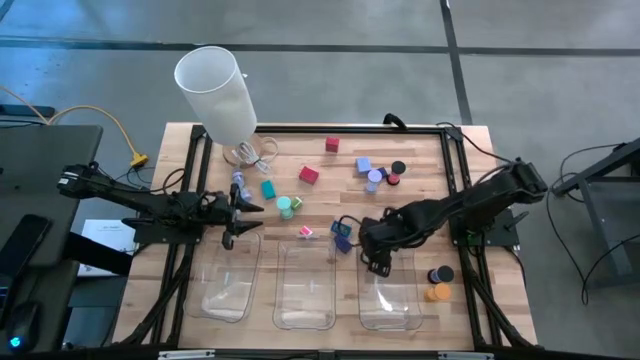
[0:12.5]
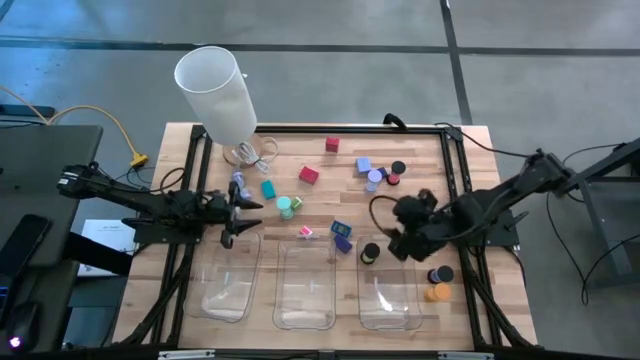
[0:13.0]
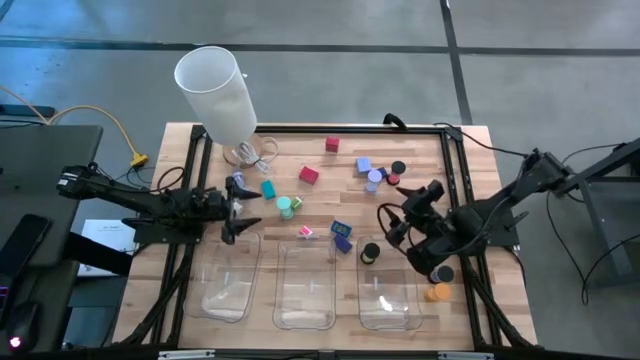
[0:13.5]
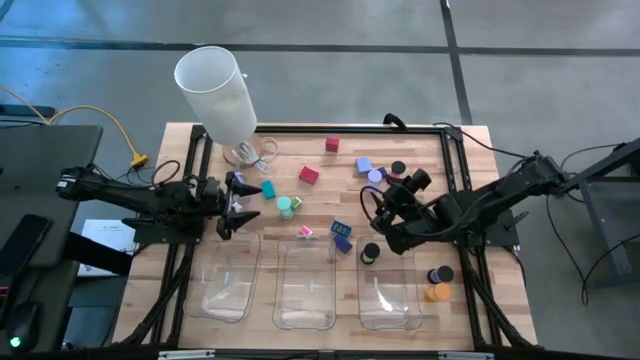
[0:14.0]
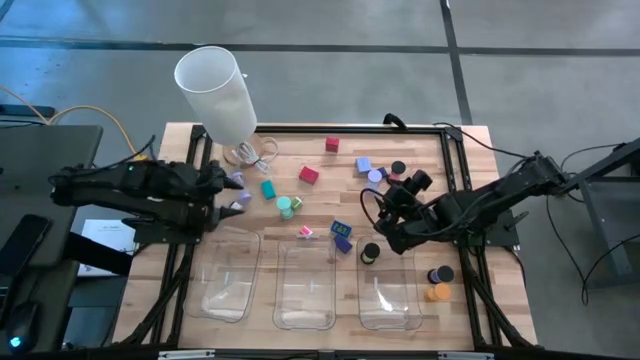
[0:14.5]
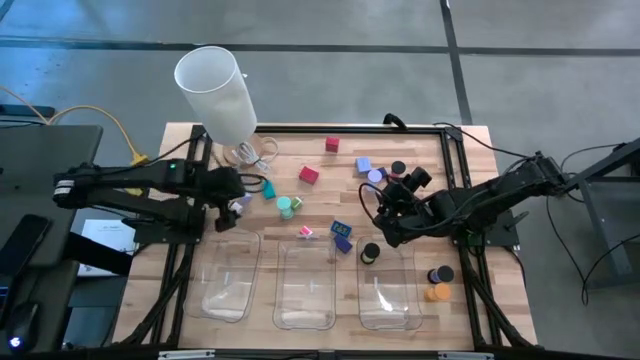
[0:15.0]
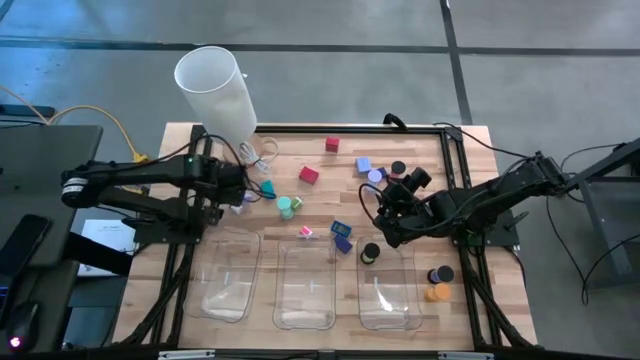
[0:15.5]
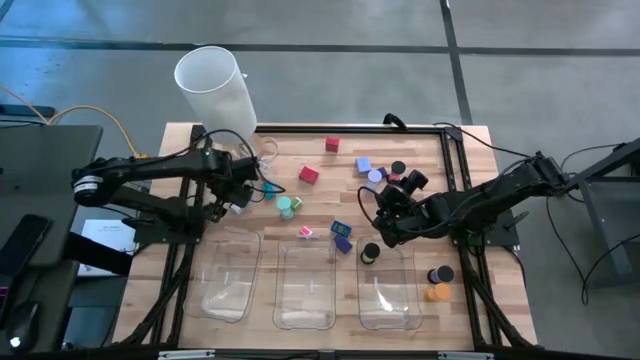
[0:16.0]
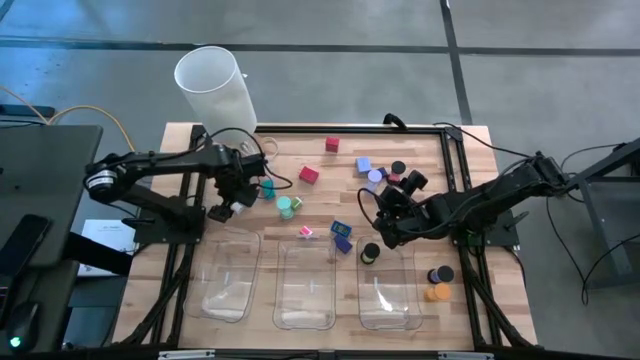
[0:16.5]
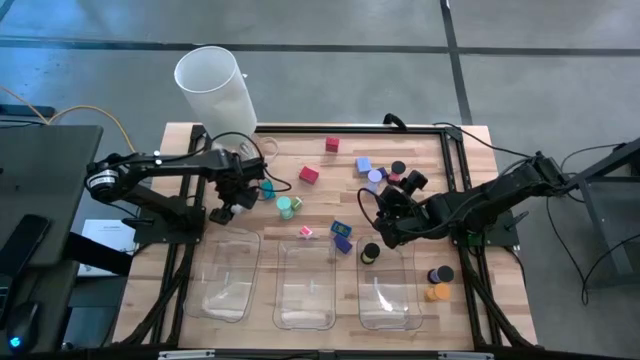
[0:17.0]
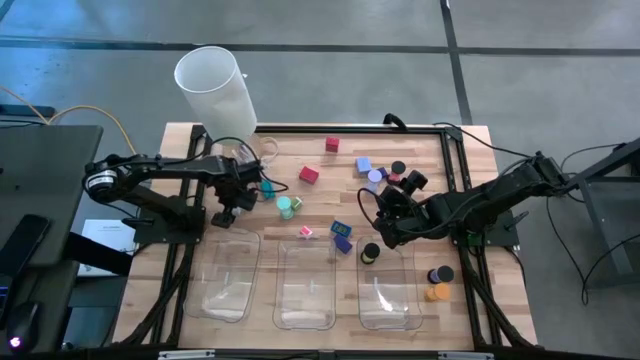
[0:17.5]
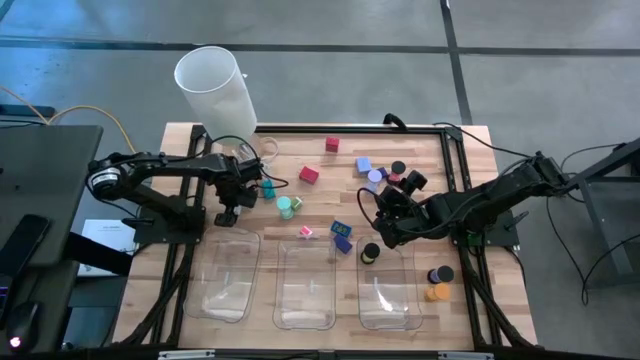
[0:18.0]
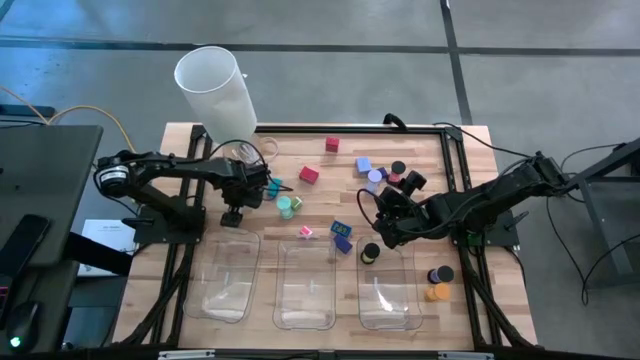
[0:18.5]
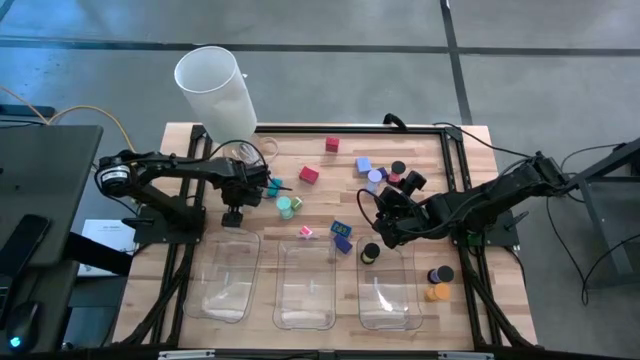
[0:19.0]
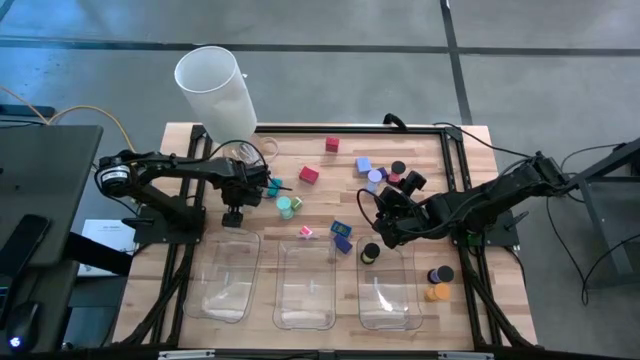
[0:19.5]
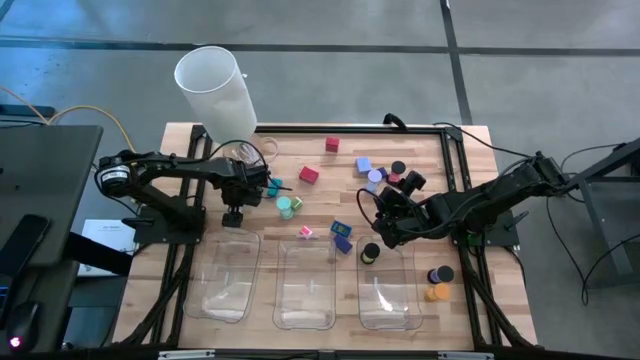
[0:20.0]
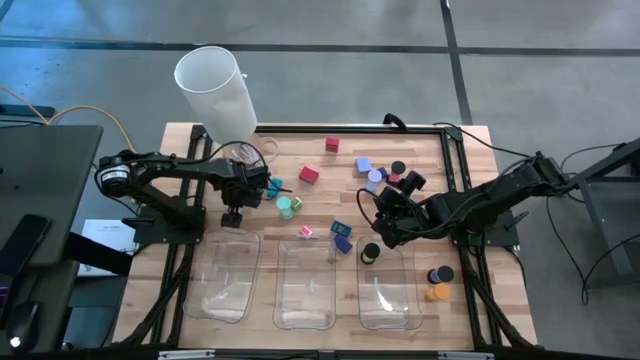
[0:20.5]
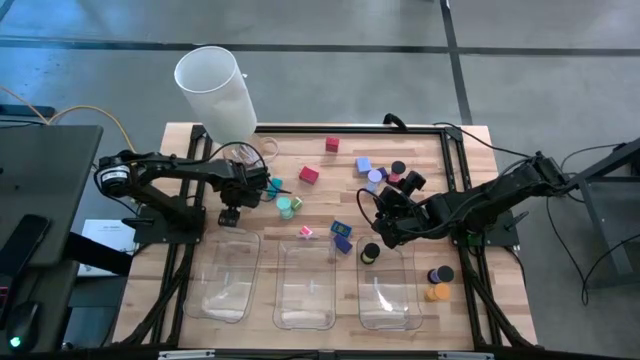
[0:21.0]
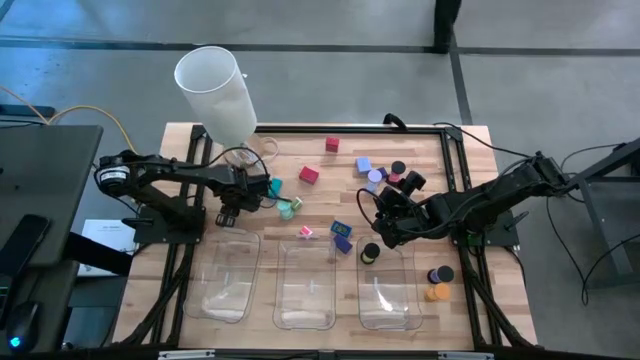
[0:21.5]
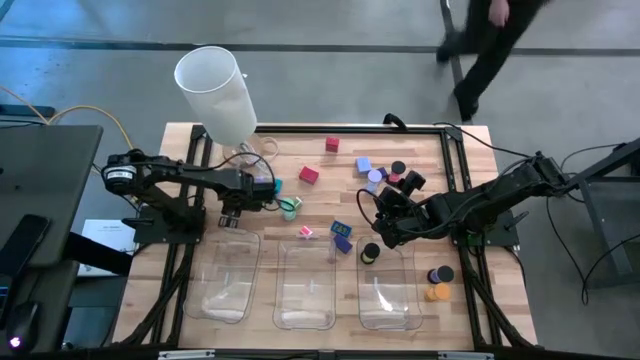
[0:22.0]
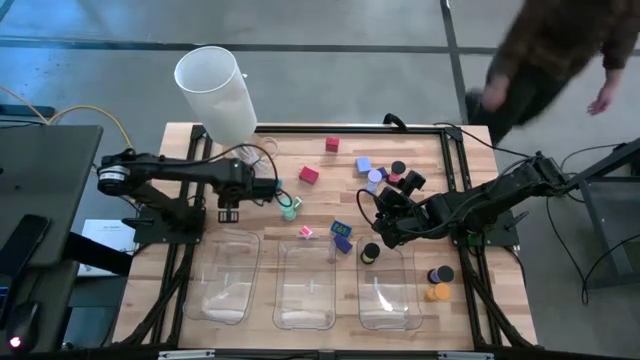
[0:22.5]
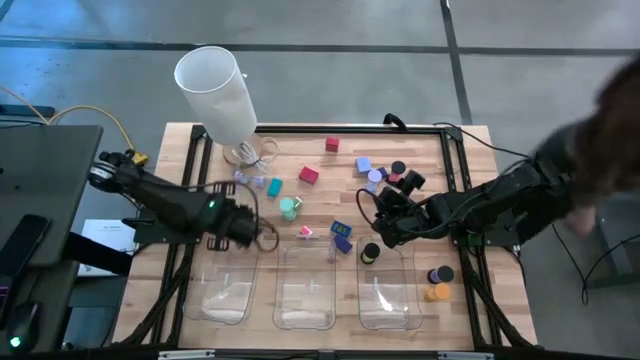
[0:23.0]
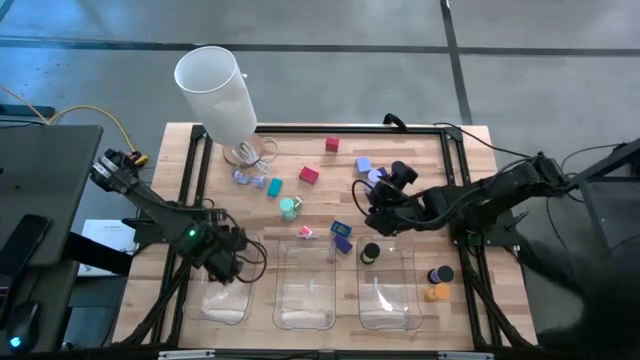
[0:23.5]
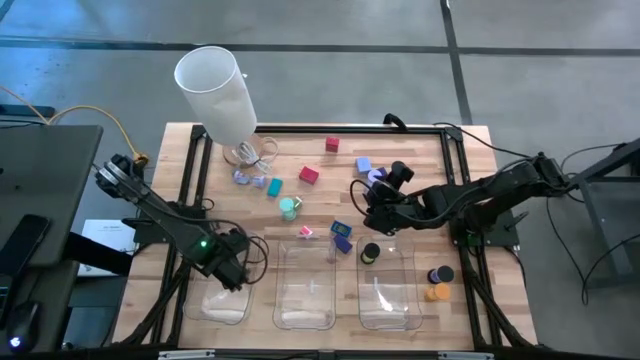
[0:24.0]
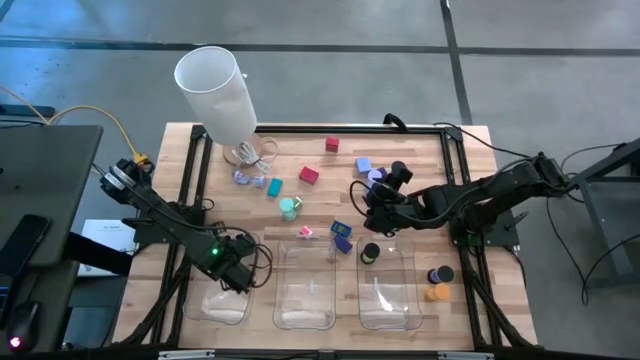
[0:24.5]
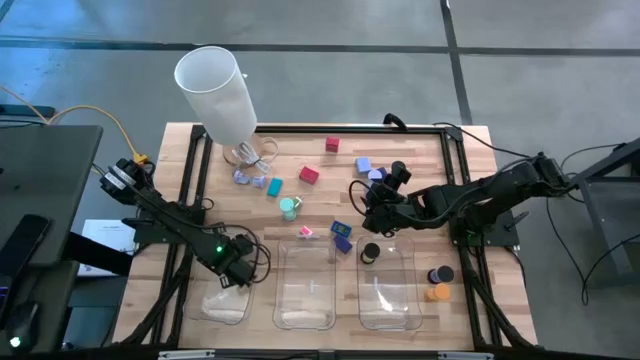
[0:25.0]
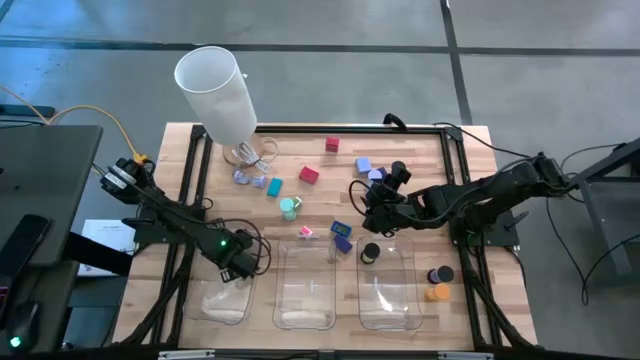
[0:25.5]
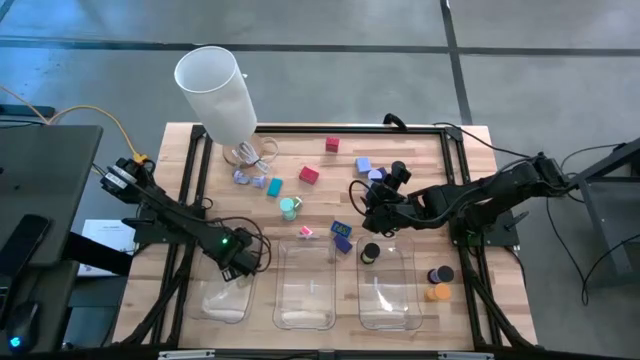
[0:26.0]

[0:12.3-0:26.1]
Task: Pick & Place Office items
Put the white adapter into the left bin

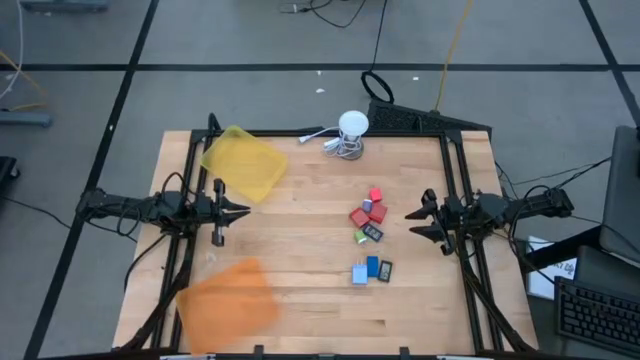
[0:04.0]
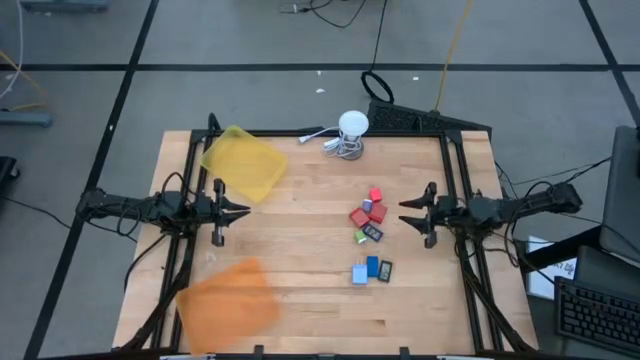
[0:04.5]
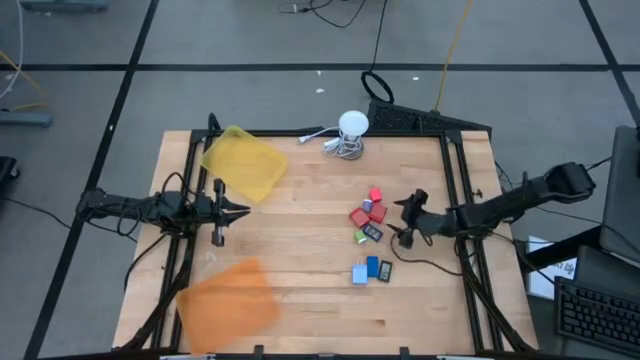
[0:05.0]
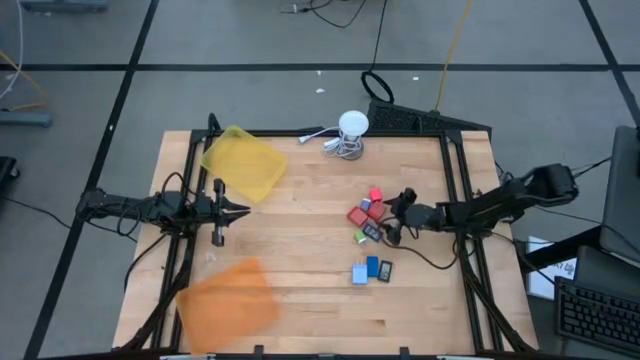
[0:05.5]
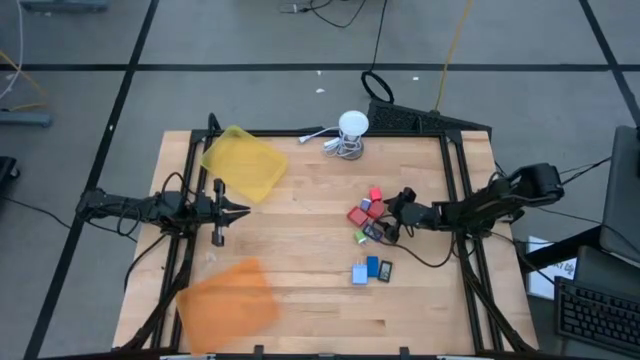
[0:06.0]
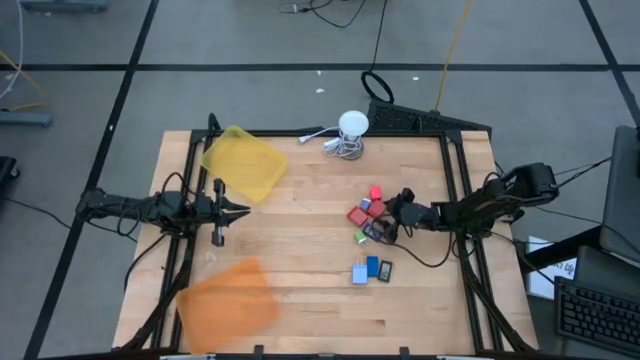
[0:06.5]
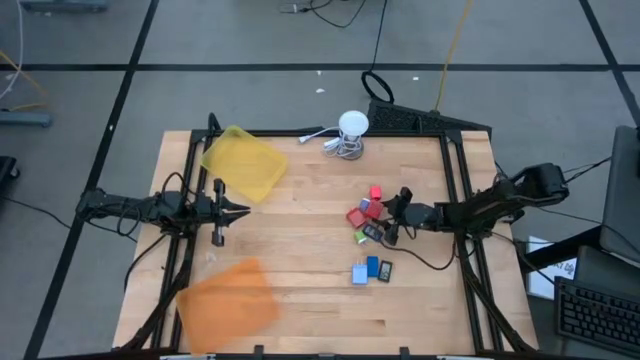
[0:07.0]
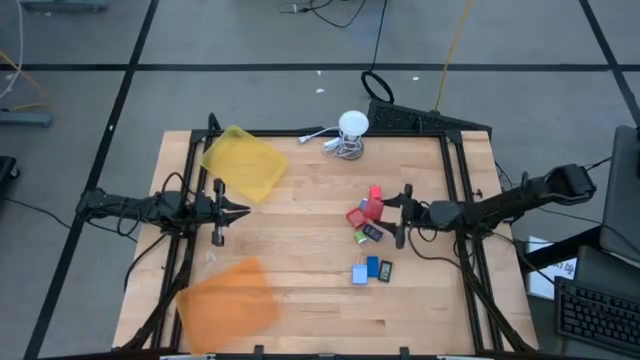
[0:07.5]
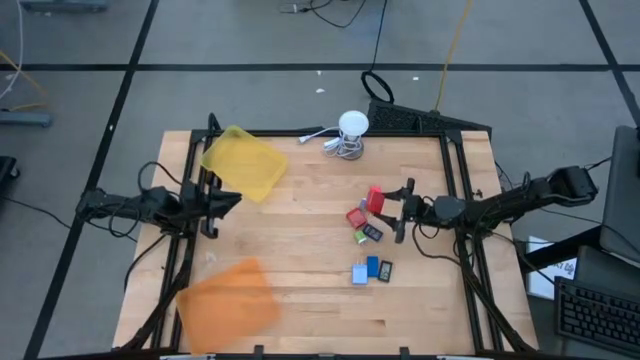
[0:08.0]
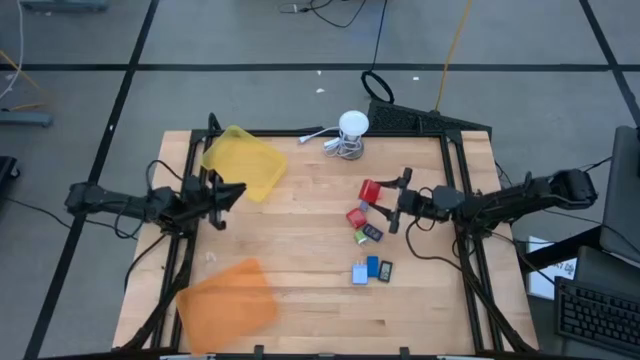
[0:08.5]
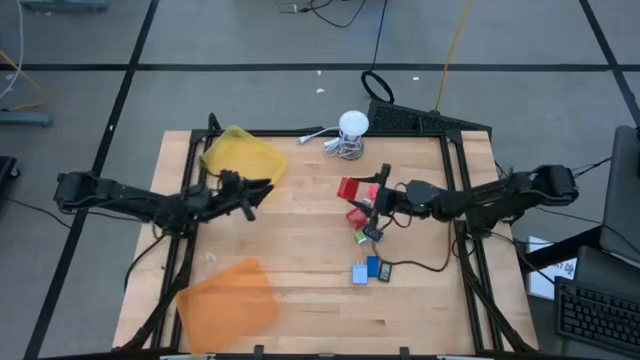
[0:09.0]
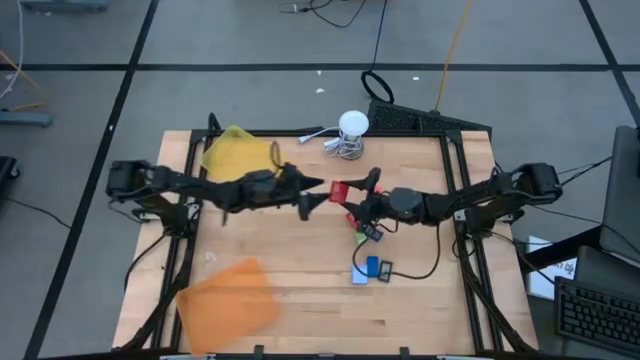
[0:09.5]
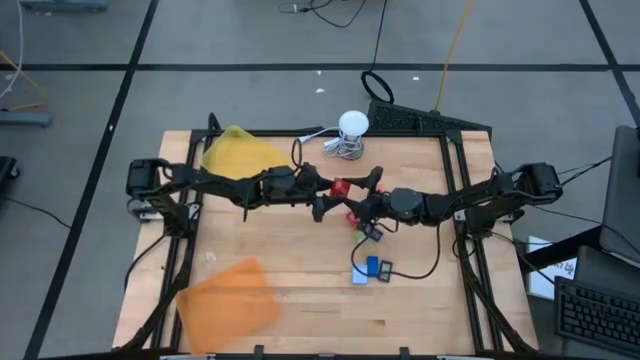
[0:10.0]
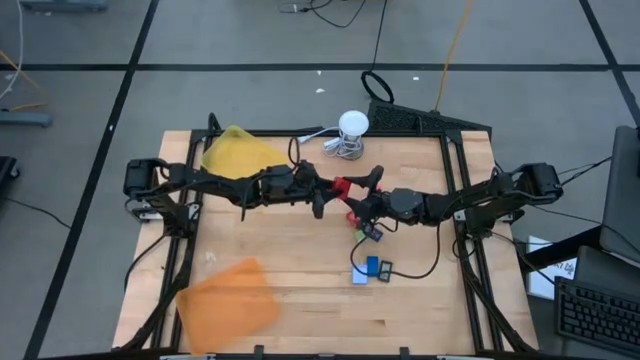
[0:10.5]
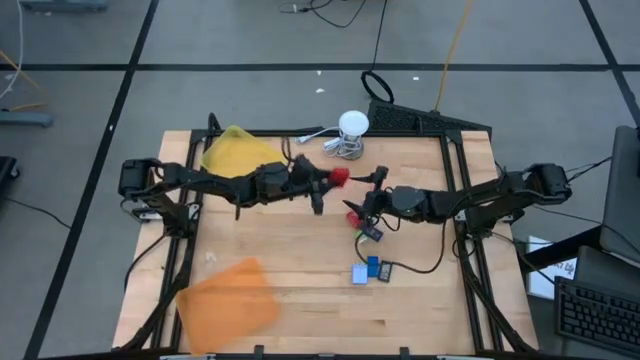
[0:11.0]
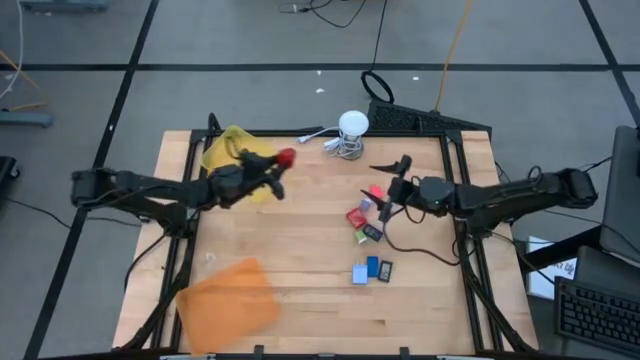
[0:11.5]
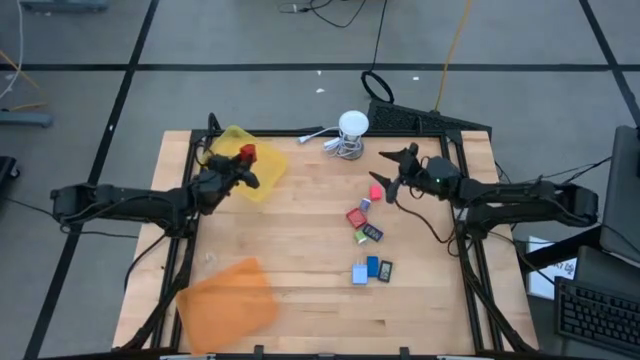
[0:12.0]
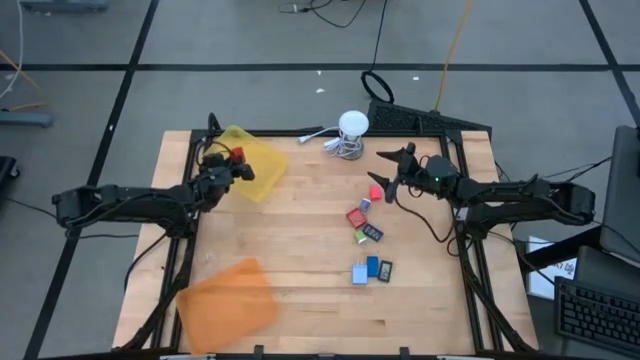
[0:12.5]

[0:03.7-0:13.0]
Task: Pick & Place Office items
Put the right red charger adapter into the yellow bin
